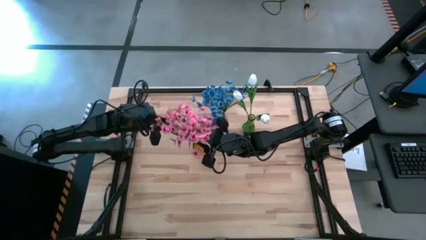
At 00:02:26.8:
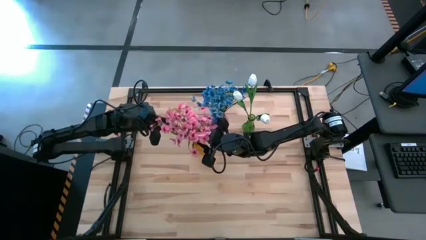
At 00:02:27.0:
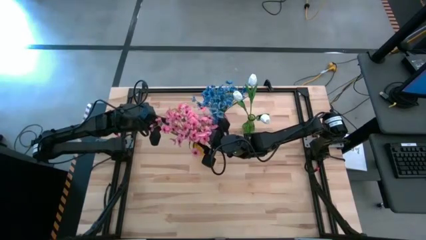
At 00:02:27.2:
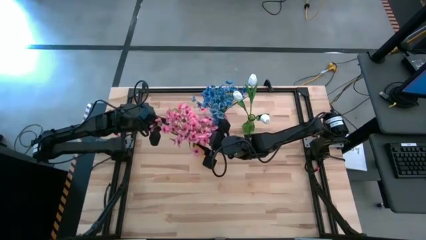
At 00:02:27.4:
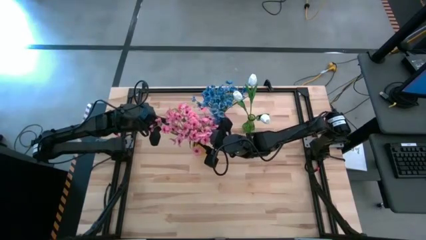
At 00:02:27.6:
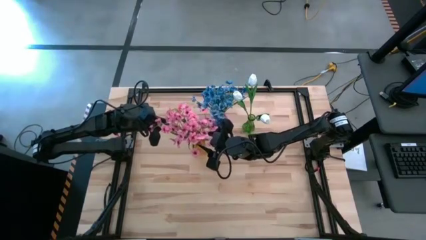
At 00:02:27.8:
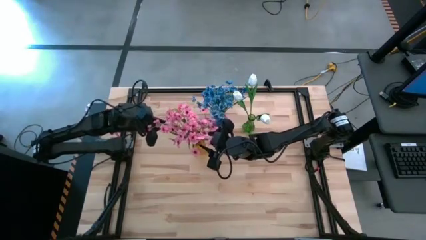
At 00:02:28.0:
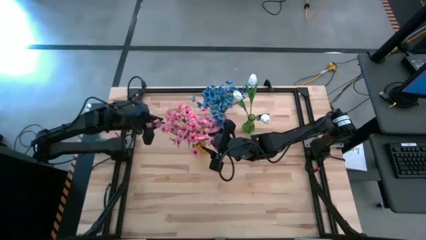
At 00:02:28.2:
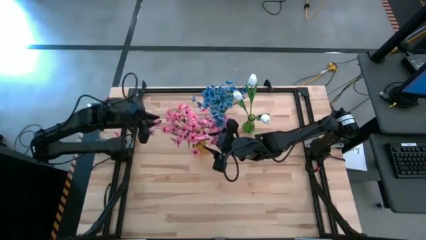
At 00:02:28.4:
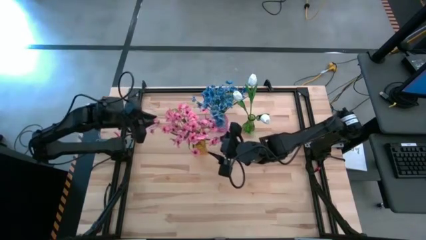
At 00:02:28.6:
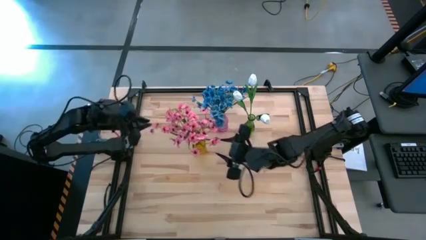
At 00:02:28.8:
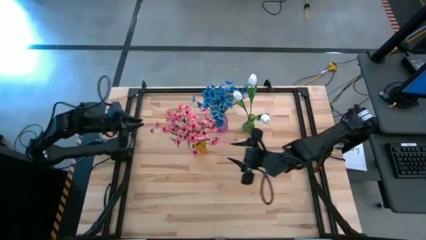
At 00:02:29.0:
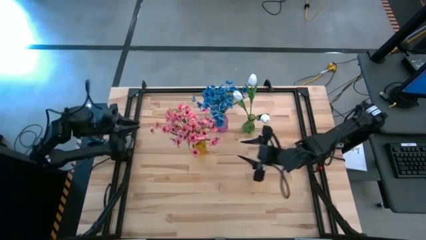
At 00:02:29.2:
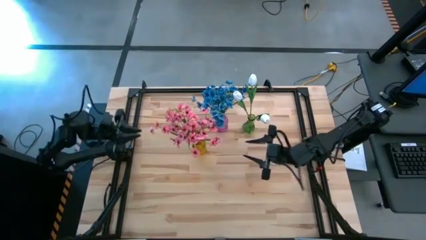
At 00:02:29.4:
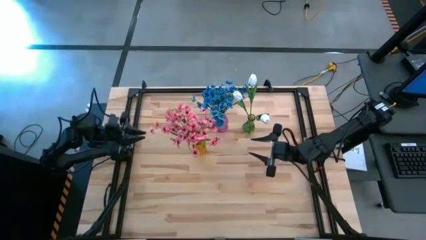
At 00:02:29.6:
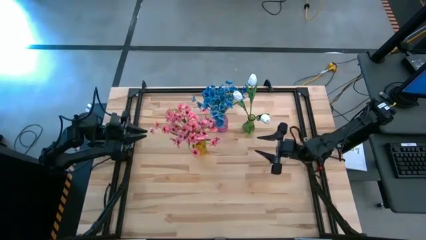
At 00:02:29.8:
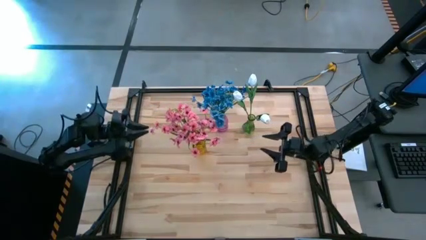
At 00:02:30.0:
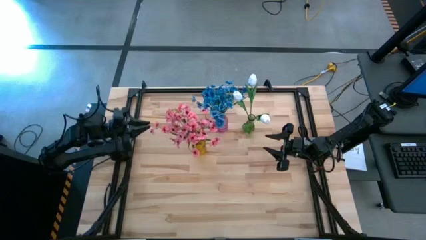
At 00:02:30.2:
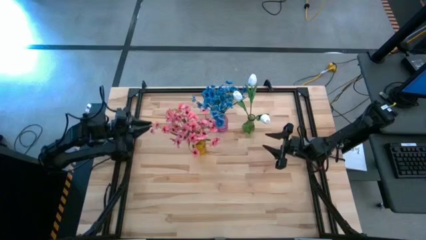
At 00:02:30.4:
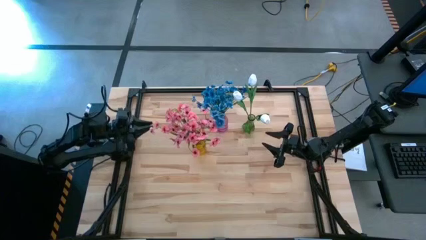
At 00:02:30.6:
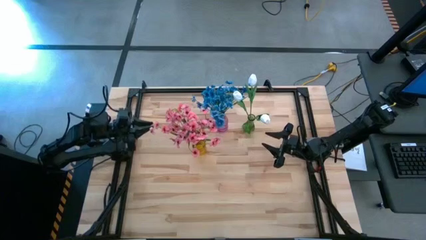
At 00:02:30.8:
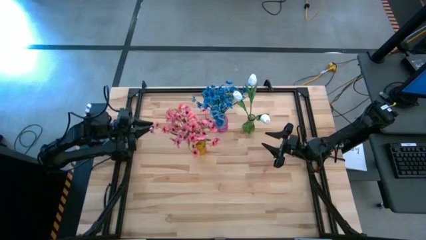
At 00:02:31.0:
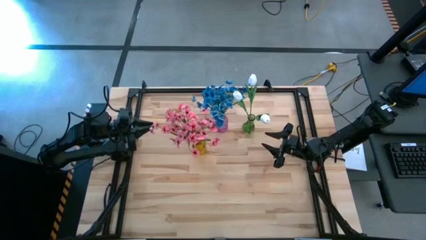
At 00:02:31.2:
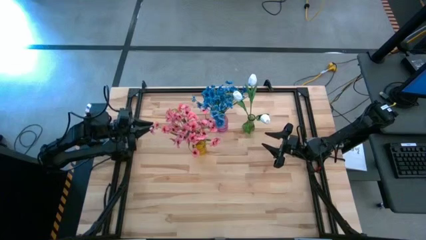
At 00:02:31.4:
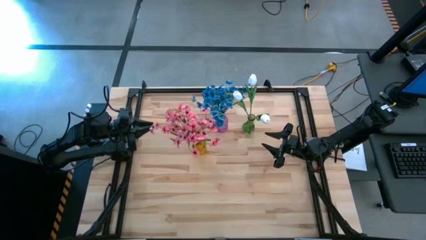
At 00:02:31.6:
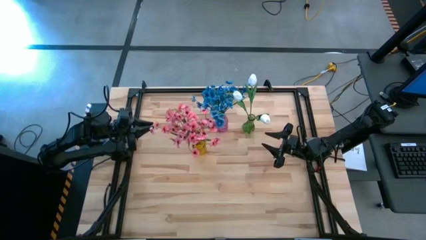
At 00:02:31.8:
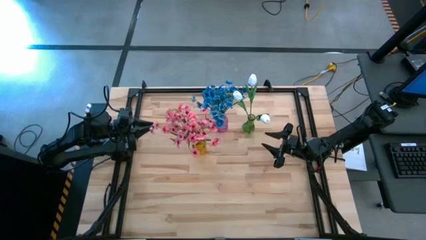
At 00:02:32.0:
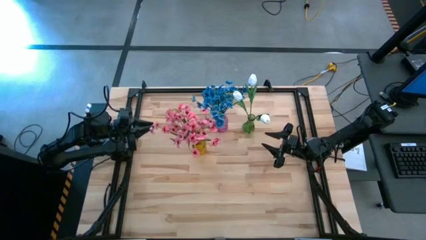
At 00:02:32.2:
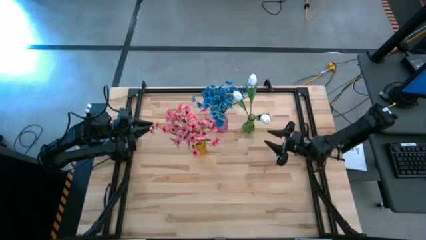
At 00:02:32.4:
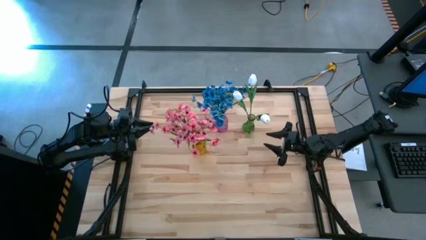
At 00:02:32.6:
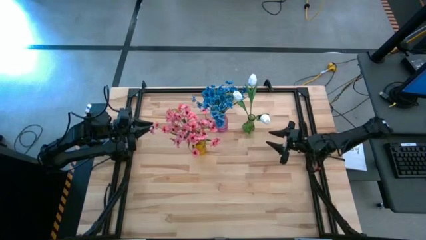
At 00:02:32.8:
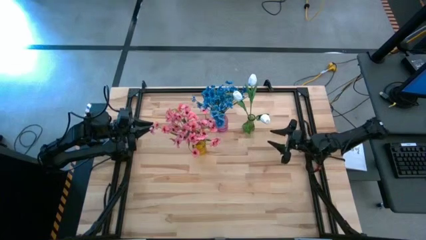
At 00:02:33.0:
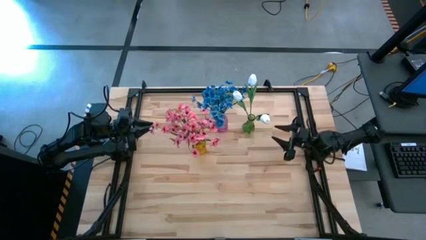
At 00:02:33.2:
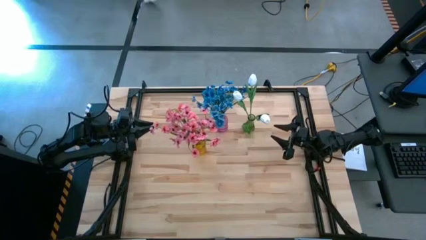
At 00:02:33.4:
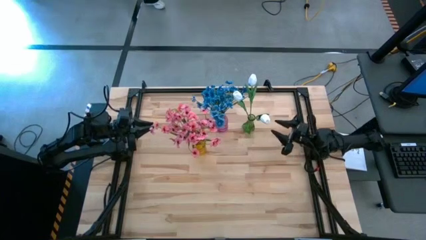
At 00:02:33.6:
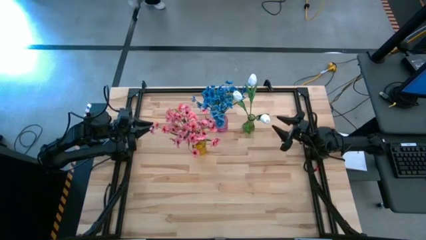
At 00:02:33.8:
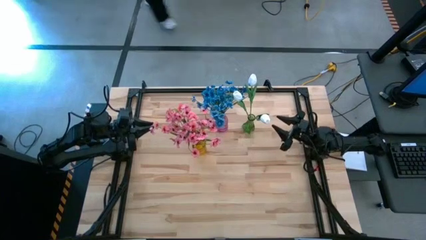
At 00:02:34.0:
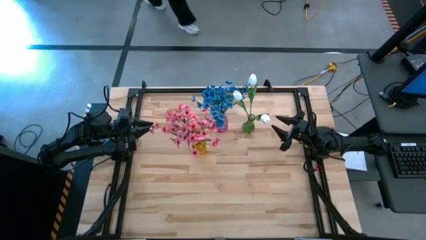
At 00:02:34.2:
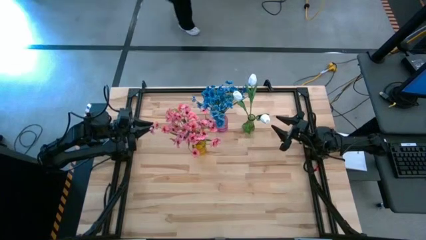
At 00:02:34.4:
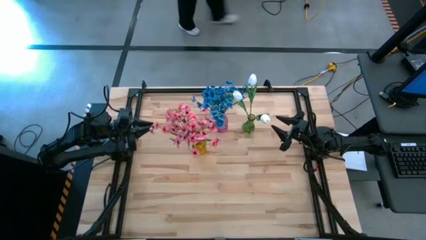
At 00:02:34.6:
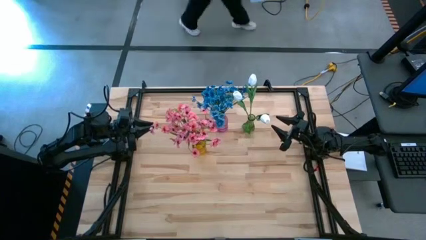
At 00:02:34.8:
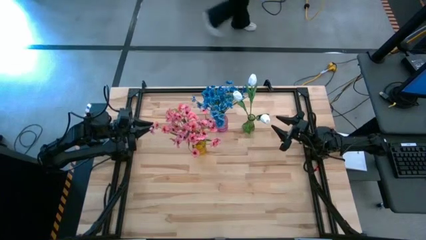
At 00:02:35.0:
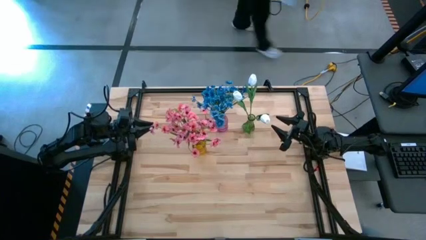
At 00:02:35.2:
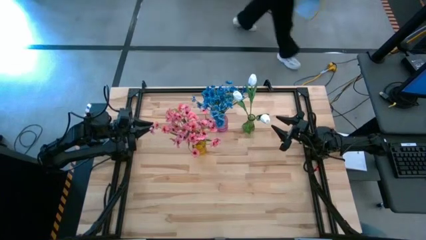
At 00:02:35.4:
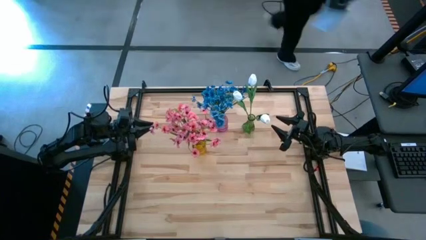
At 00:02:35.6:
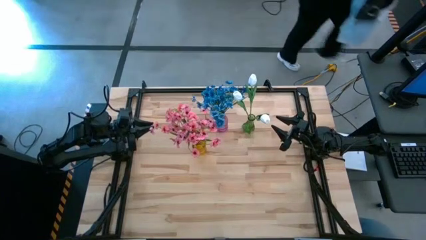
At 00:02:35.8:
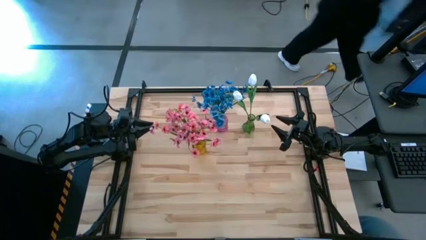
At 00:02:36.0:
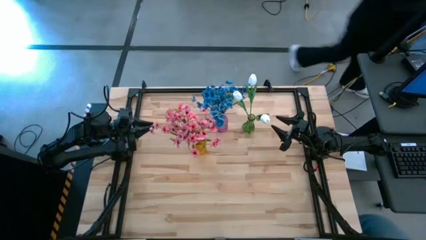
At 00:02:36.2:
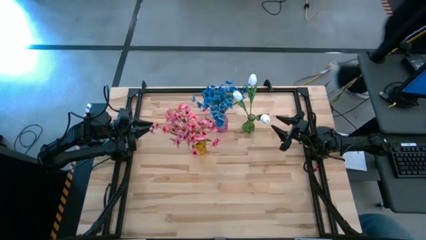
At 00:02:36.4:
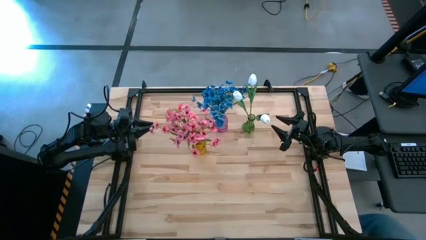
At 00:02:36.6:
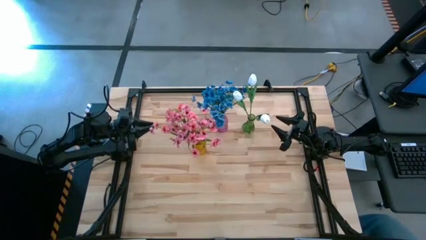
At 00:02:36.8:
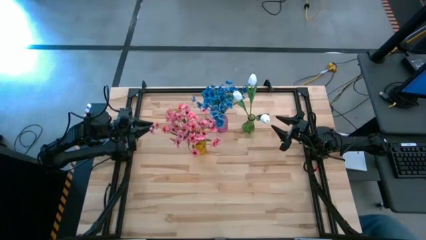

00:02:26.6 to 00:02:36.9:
Task: Sort flowers into vase by color
Return to Home Position

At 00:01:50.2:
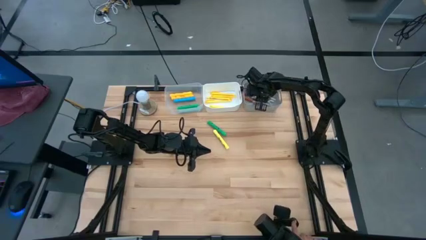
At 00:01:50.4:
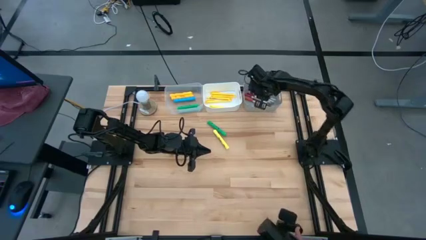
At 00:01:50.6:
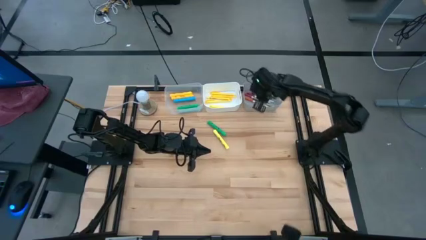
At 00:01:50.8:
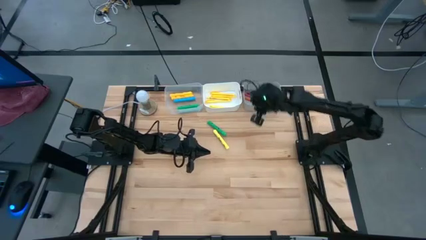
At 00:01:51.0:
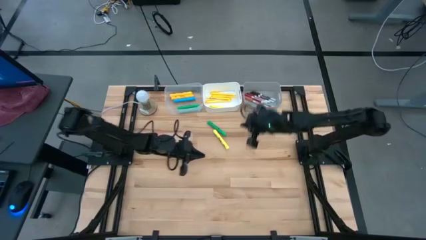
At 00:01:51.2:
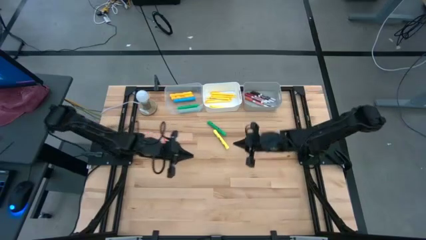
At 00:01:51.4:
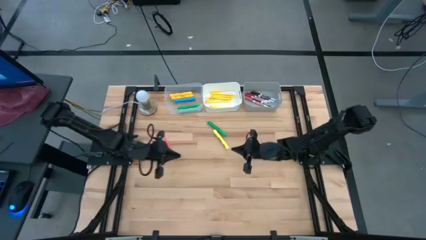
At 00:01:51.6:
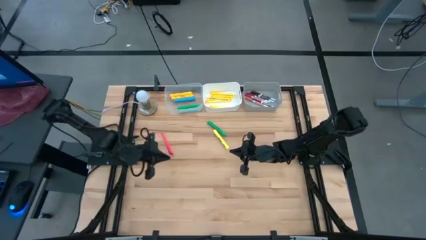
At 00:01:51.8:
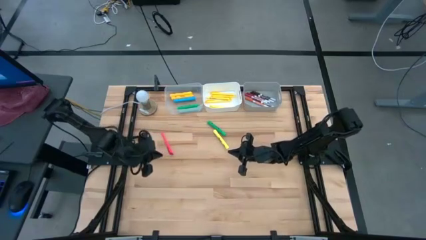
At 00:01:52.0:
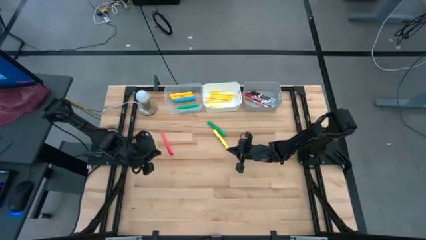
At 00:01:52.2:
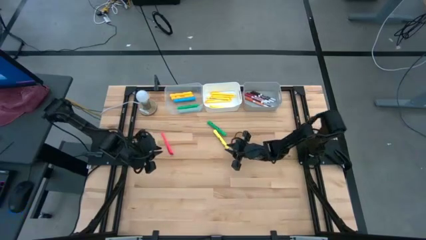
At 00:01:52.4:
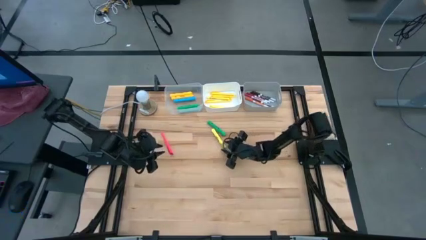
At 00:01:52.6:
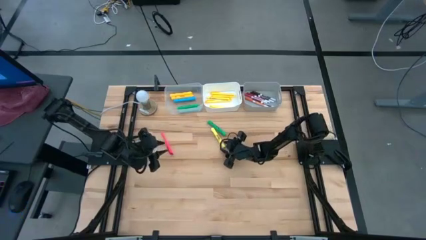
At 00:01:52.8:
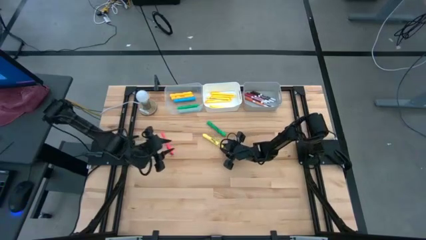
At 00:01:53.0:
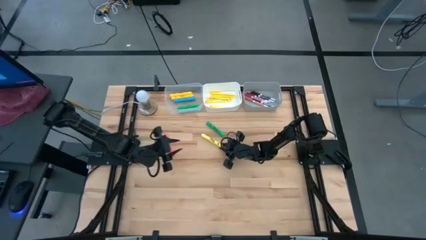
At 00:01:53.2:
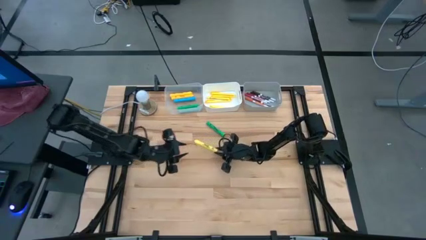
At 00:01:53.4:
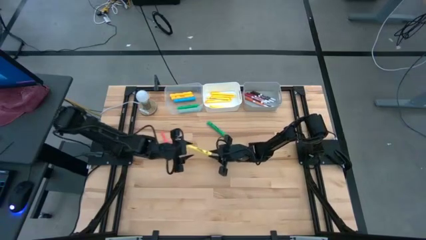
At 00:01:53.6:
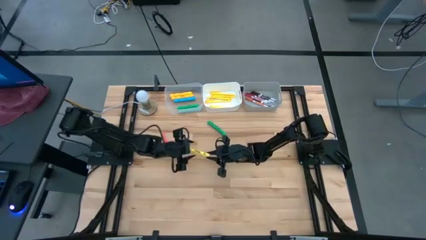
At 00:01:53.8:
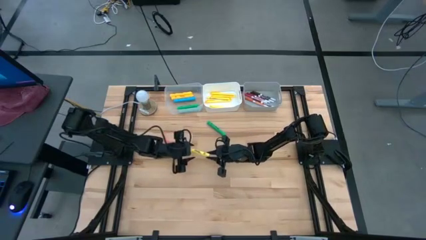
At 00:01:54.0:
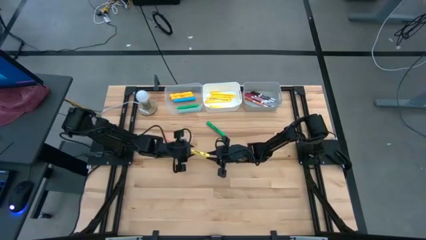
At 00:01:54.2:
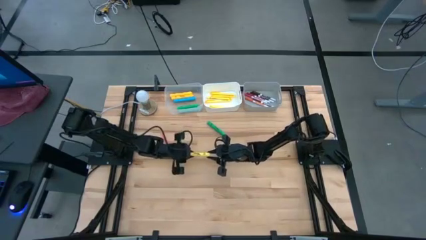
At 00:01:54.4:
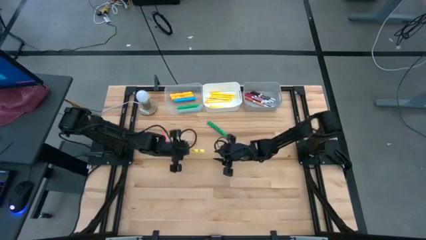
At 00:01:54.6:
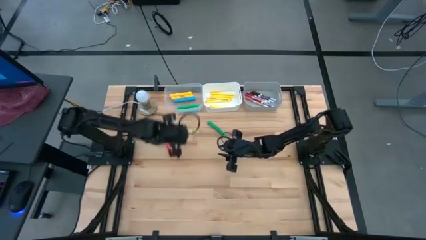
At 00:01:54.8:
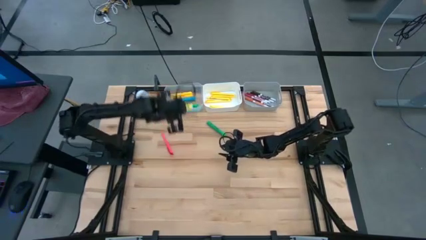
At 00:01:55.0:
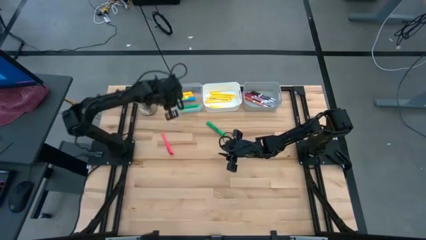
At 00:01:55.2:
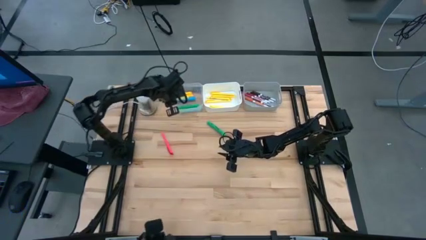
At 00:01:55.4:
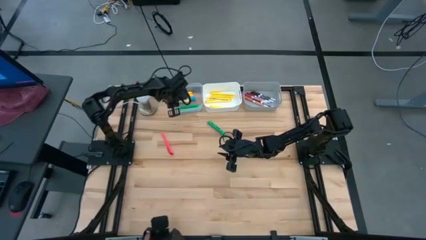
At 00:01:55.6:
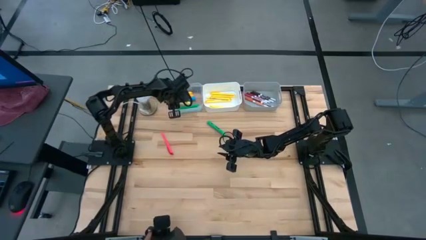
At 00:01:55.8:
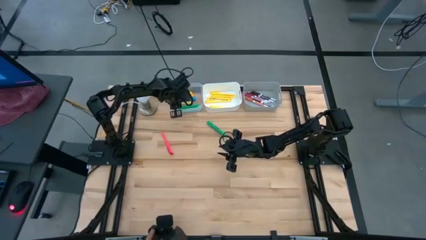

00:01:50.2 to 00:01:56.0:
Task: Pick & Place Markers
Put the yellow highlighter pen into the transparent bin

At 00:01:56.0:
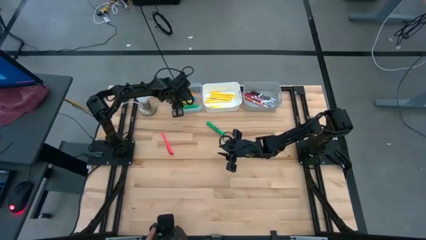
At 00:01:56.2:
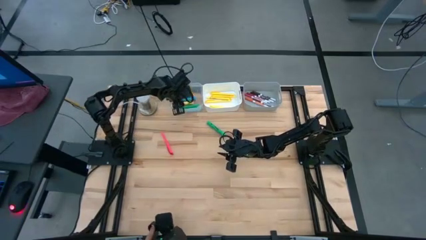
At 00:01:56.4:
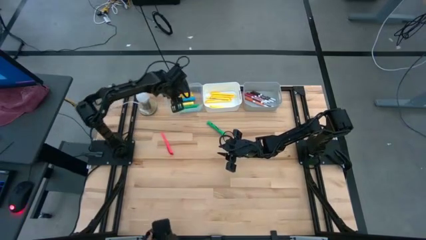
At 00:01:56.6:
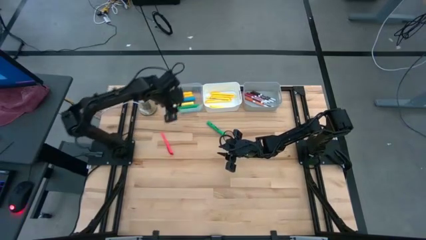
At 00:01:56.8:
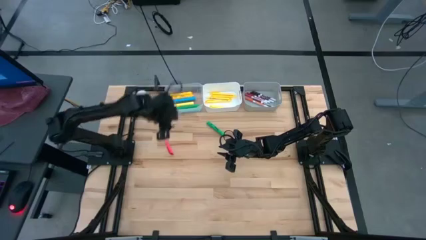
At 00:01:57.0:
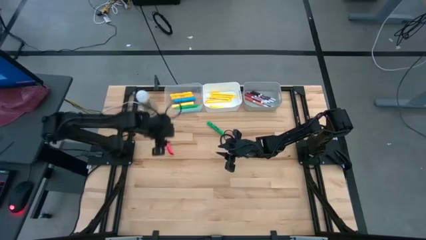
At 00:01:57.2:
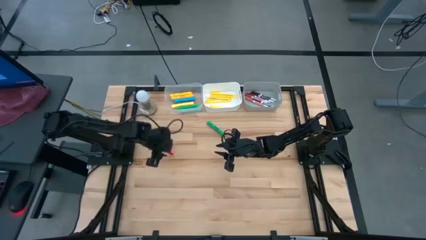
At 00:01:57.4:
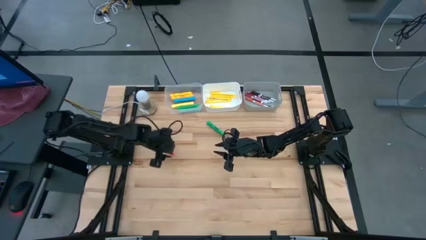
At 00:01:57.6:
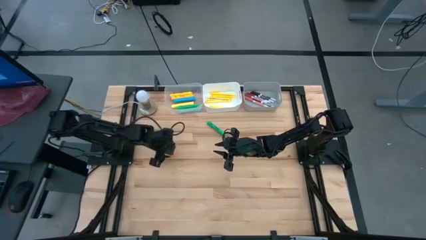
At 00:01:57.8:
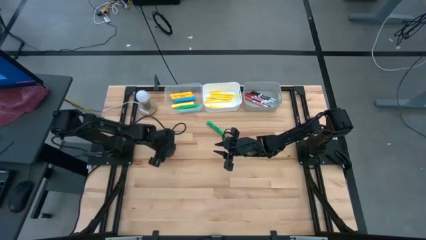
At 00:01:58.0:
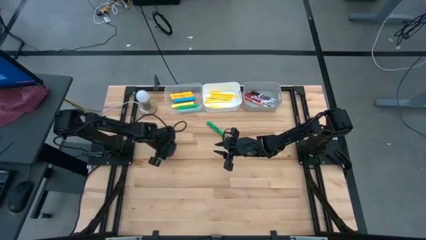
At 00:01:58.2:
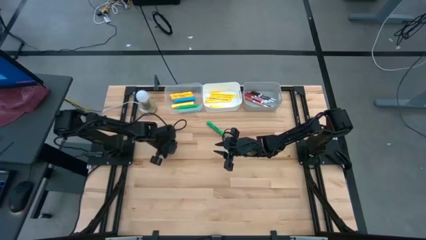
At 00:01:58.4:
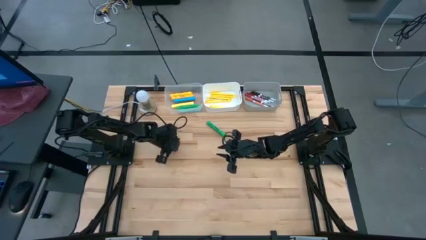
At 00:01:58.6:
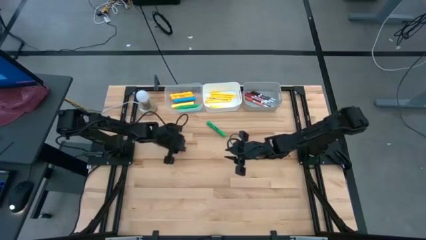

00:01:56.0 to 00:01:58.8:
Put the pink pen into the white bin
